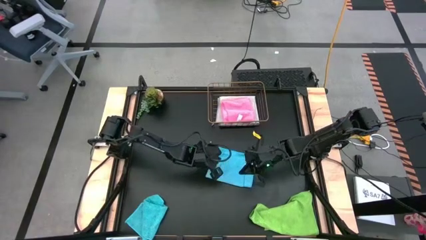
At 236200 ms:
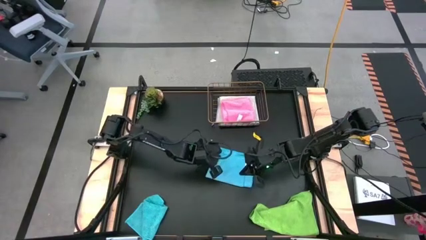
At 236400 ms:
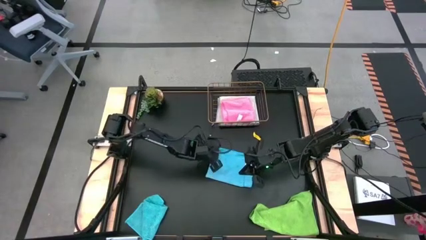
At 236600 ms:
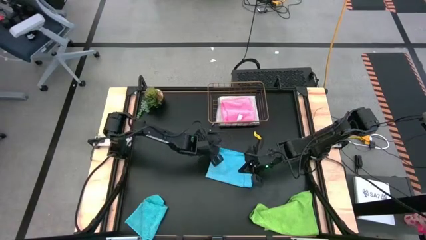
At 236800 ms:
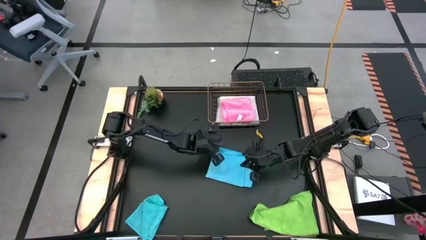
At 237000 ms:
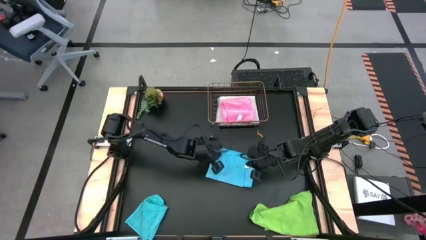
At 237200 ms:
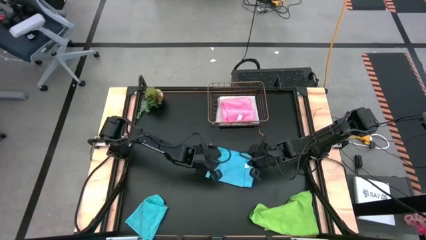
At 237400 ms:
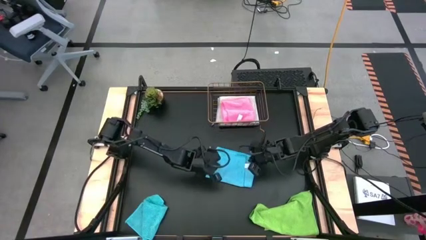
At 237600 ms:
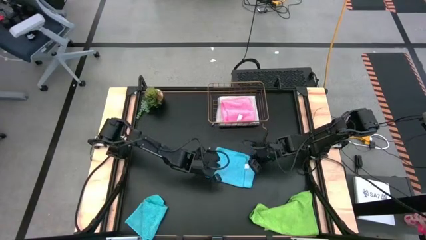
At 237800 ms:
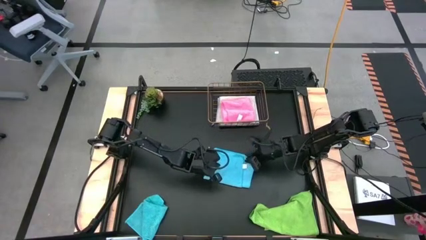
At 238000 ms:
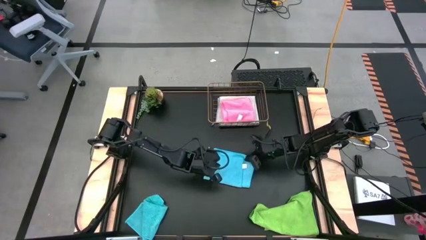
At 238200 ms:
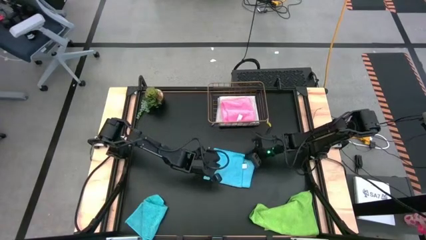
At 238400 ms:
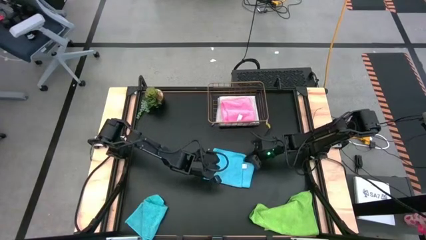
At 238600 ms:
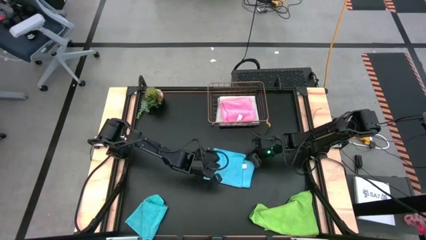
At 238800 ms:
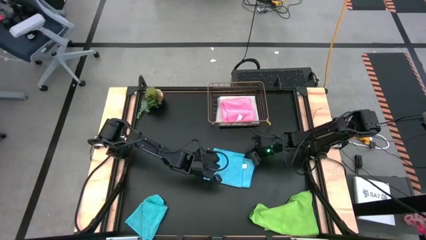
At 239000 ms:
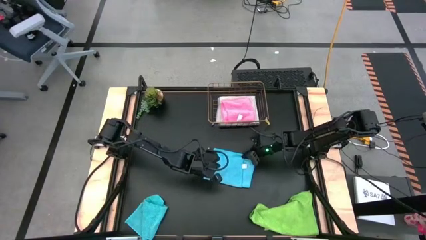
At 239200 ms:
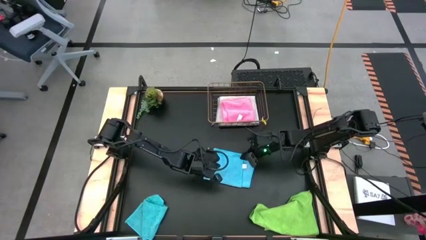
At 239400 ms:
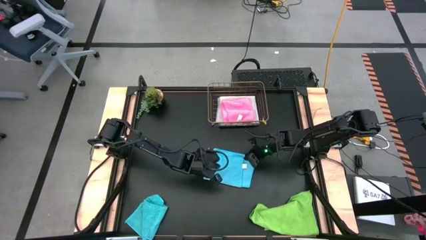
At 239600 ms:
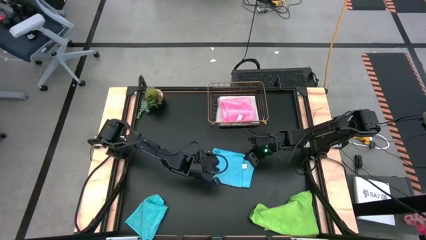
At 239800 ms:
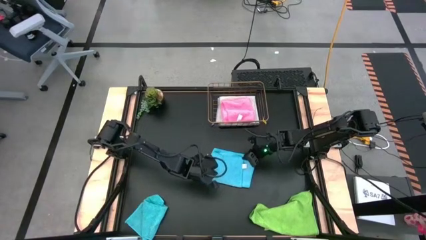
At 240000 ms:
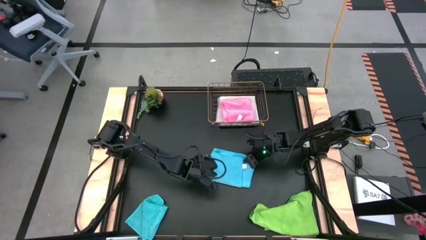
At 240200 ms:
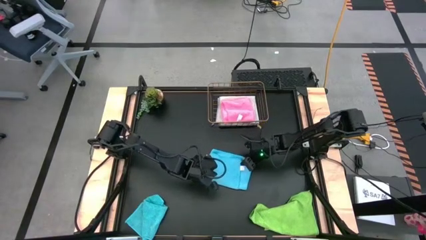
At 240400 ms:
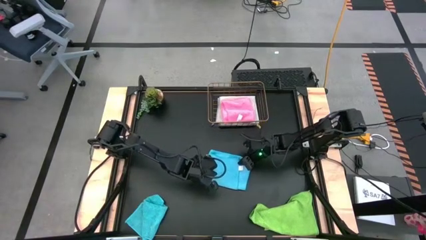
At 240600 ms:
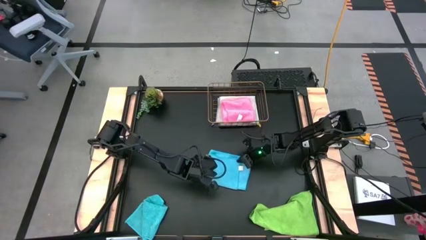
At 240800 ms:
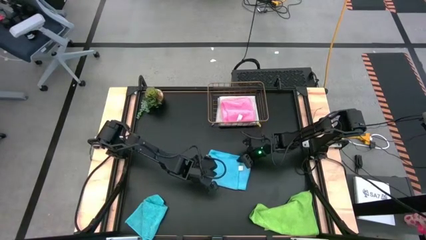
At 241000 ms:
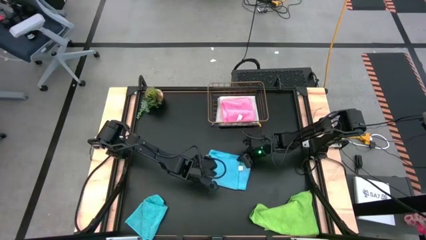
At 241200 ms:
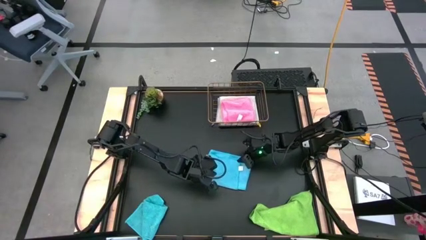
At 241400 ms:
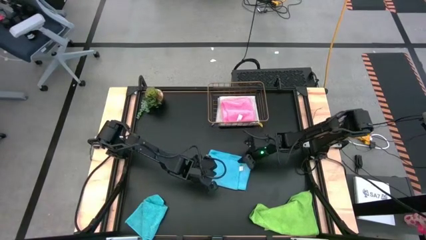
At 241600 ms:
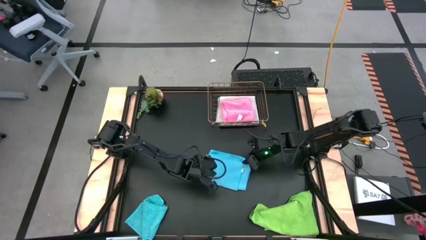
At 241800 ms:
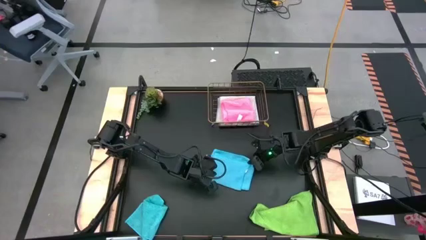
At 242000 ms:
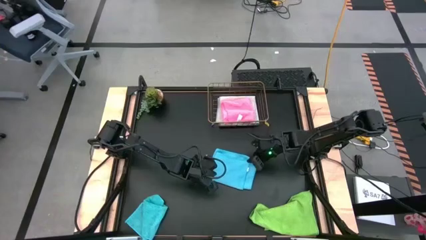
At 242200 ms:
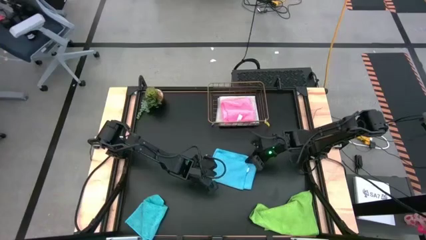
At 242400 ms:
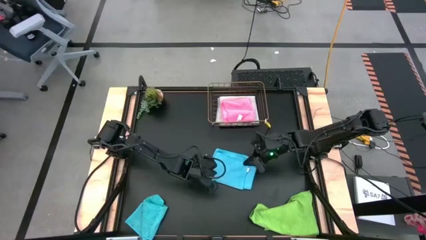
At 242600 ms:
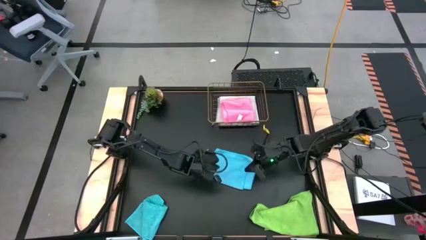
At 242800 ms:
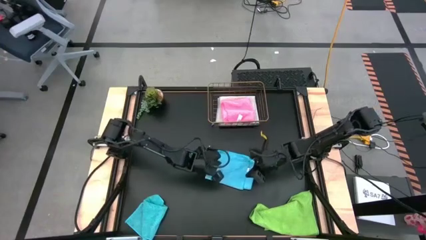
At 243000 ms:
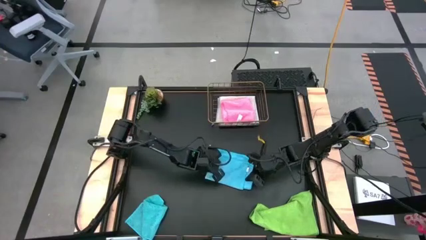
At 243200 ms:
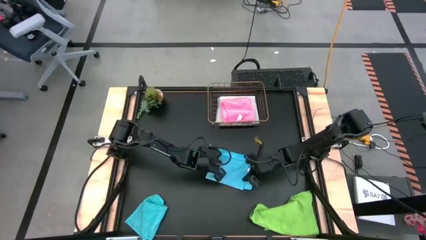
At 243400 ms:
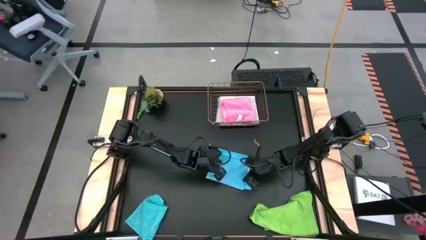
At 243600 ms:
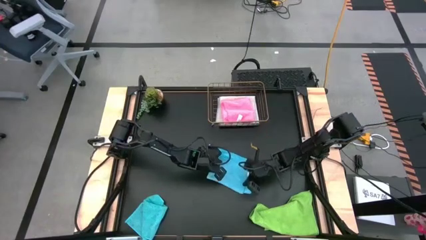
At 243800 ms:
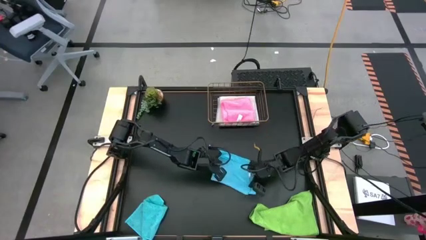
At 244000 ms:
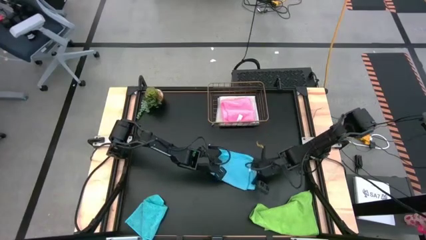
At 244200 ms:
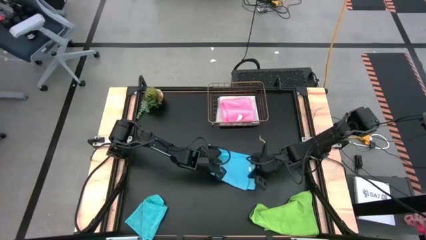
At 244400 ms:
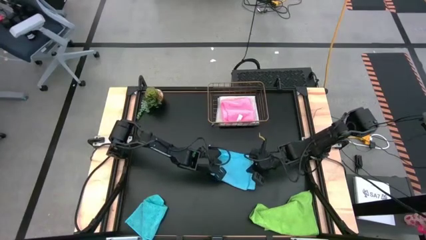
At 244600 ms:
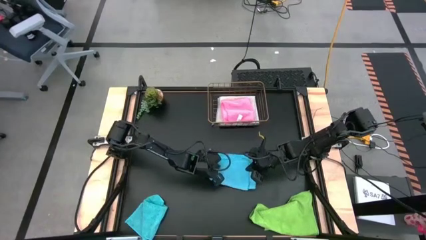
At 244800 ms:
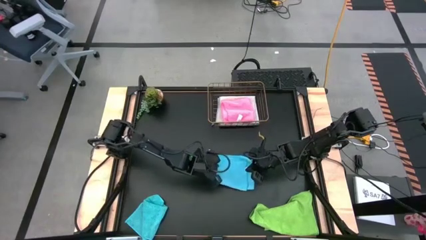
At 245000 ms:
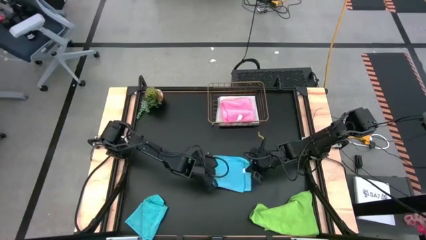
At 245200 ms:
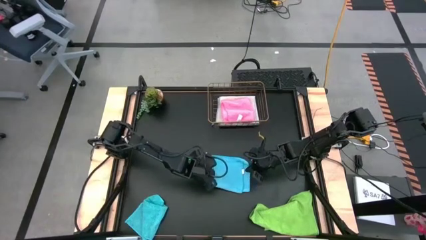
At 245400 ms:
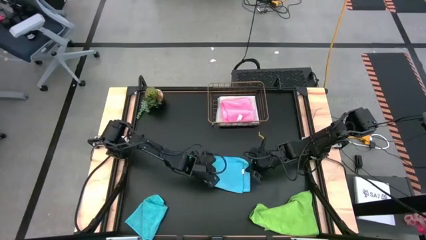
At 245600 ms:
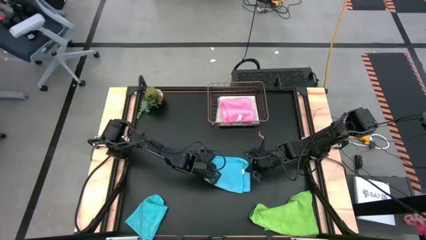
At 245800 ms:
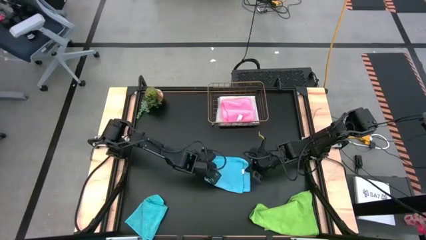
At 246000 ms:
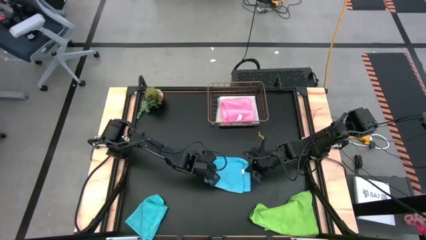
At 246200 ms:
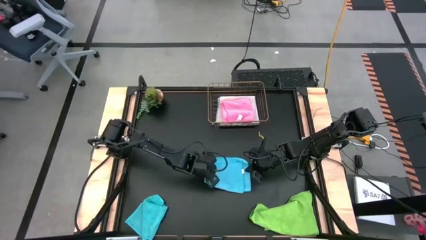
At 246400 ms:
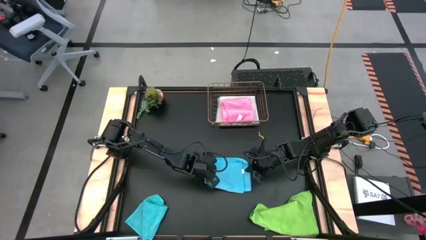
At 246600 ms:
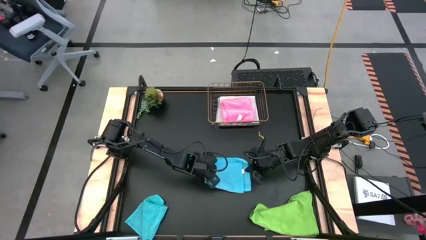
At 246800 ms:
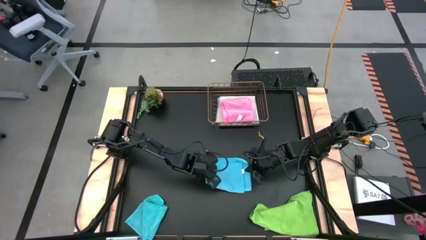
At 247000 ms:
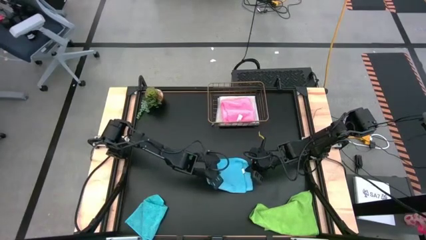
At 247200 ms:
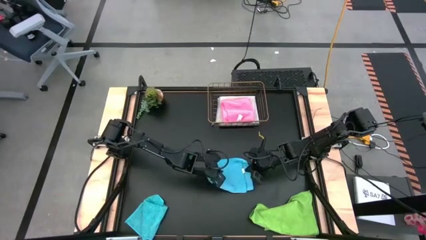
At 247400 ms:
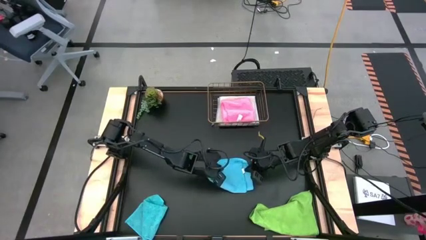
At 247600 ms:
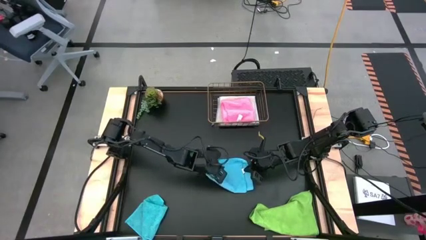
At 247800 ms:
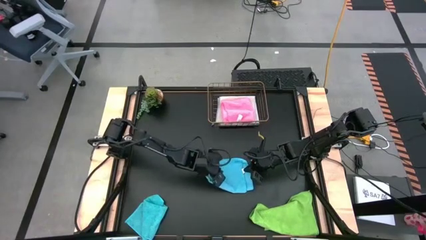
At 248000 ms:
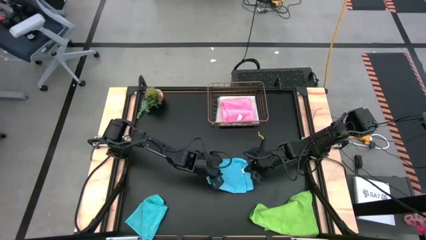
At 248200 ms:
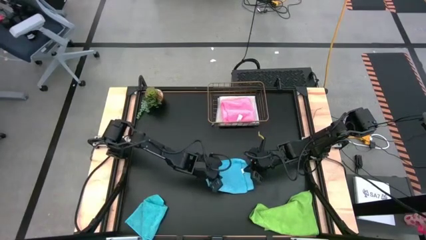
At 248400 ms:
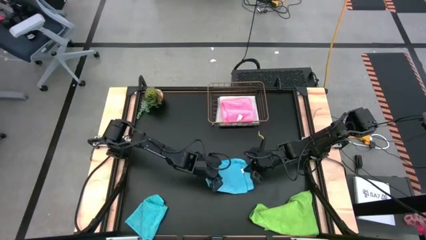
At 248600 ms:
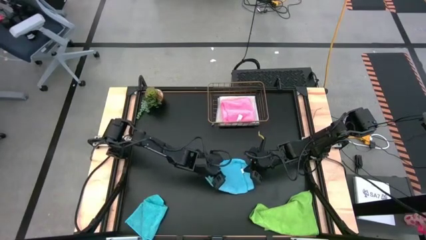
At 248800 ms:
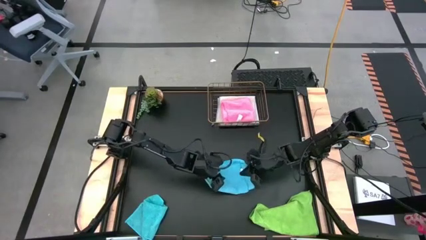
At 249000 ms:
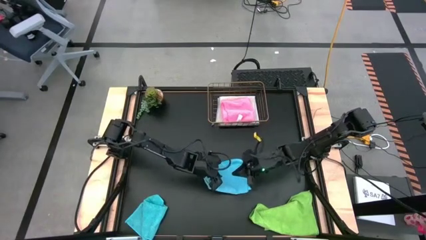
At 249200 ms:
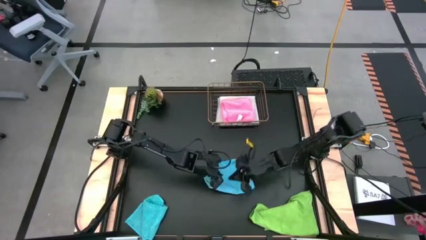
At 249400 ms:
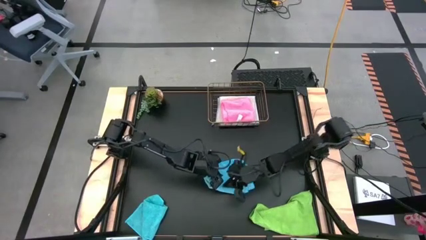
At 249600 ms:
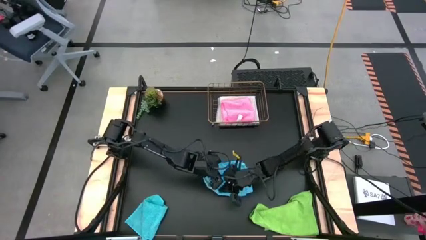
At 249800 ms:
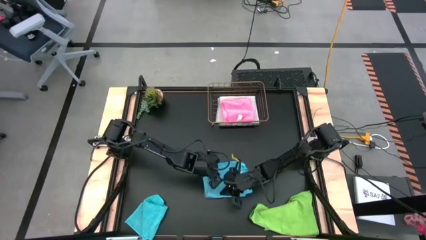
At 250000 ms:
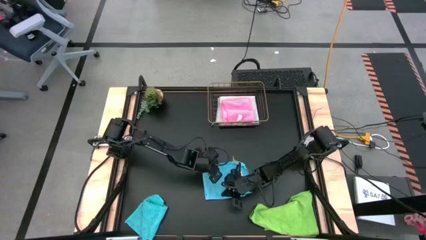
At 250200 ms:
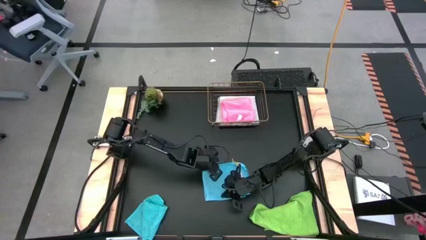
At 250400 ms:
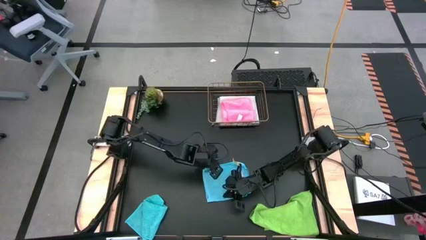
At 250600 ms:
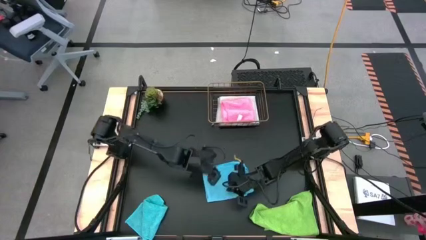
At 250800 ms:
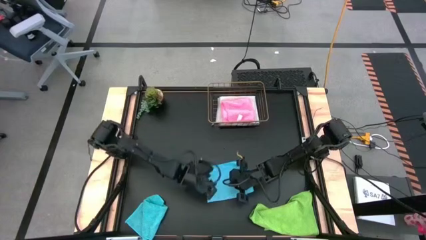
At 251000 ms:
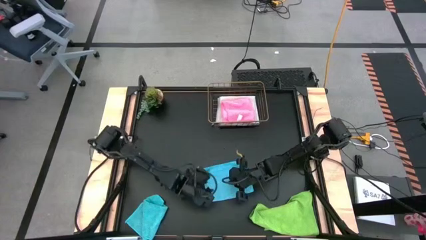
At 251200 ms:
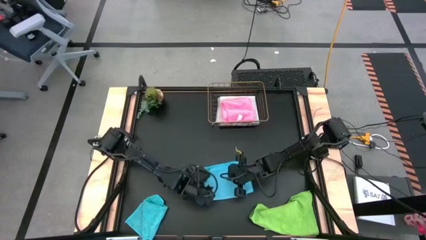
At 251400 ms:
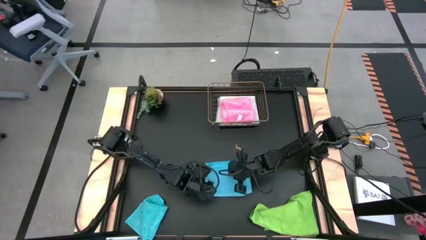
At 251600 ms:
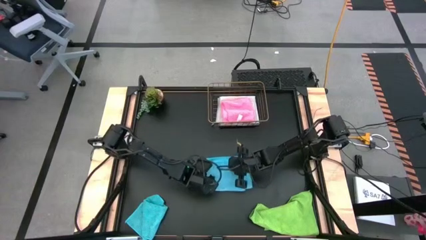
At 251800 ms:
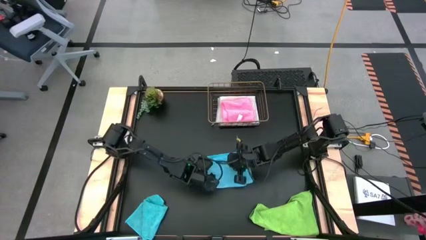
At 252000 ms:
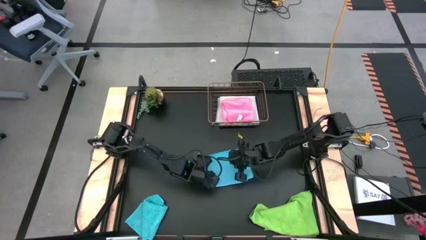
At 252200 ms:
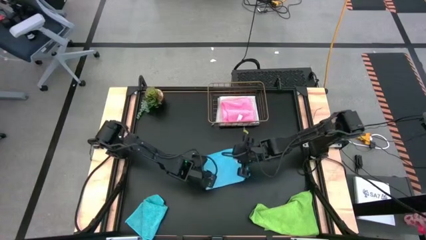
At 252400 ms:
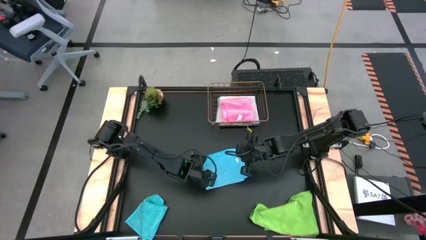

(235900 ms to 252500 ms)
Task: Fold microfiber towels
Fold the right blue towel
